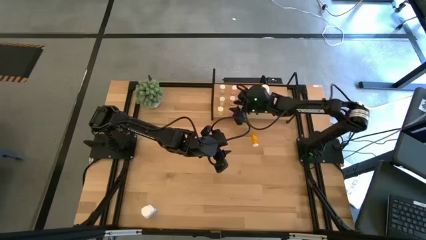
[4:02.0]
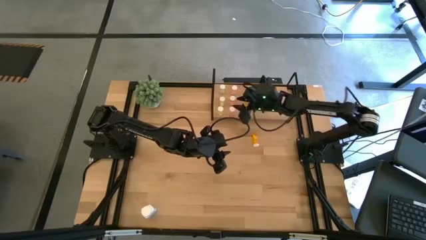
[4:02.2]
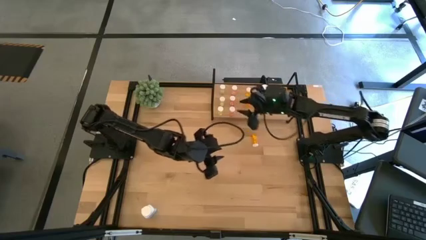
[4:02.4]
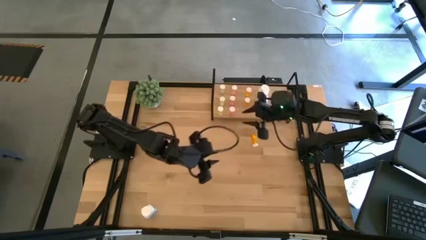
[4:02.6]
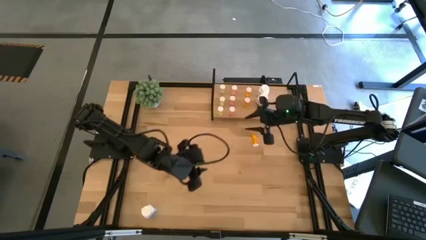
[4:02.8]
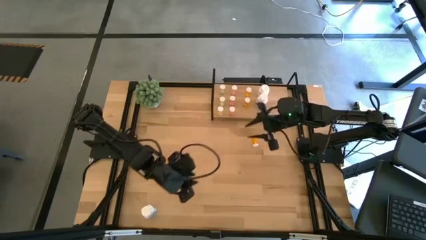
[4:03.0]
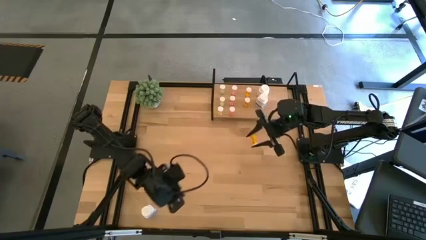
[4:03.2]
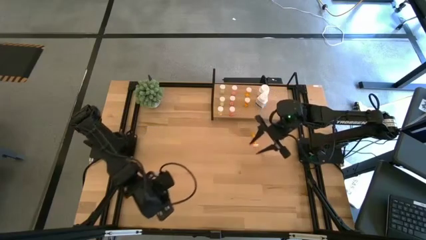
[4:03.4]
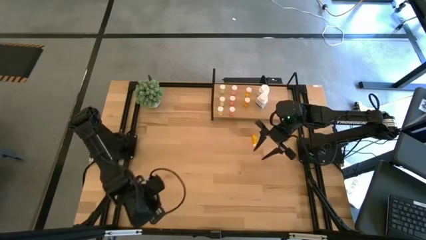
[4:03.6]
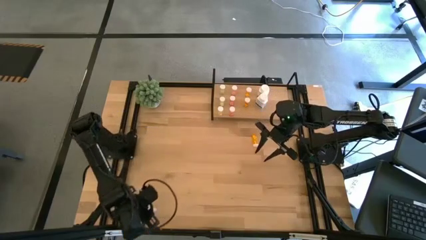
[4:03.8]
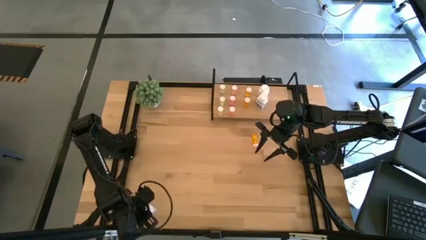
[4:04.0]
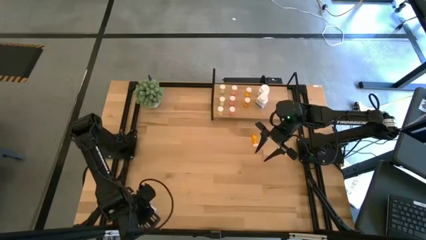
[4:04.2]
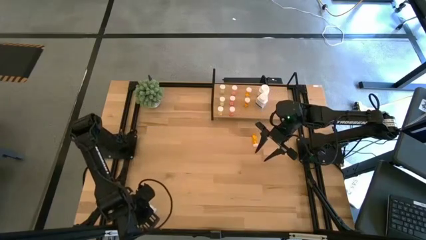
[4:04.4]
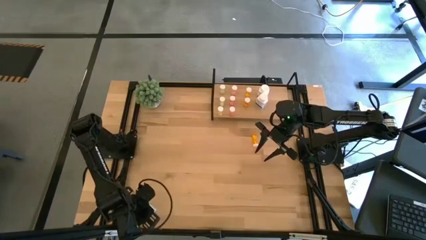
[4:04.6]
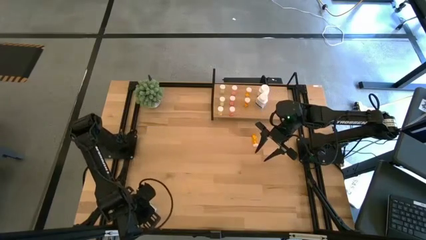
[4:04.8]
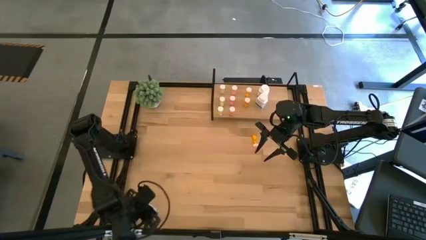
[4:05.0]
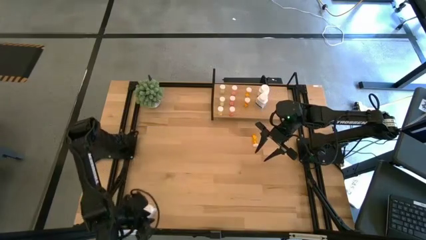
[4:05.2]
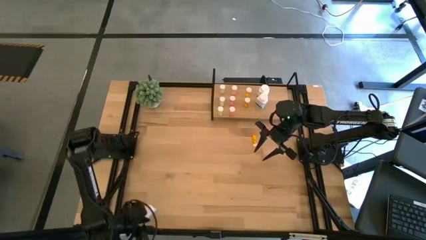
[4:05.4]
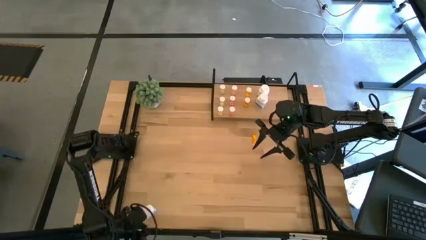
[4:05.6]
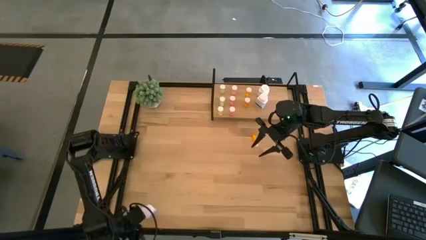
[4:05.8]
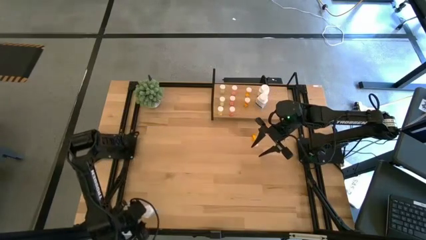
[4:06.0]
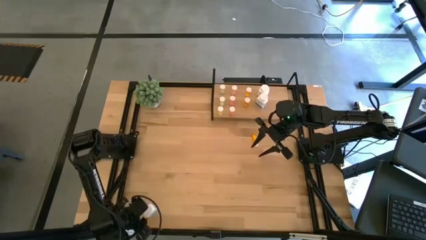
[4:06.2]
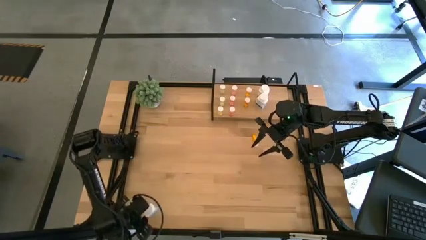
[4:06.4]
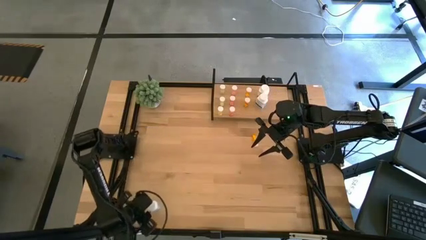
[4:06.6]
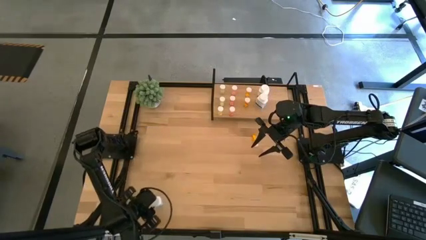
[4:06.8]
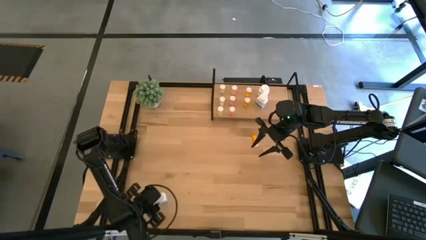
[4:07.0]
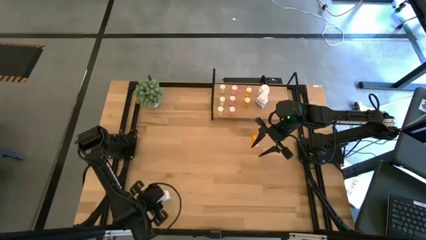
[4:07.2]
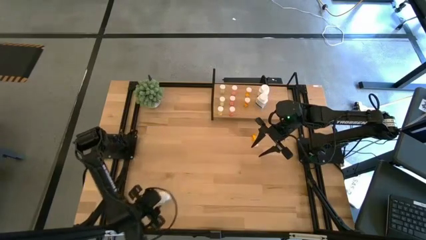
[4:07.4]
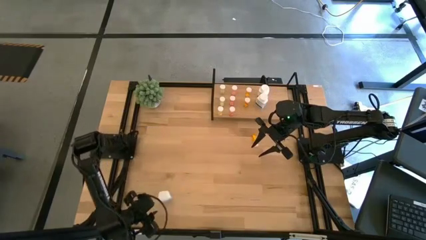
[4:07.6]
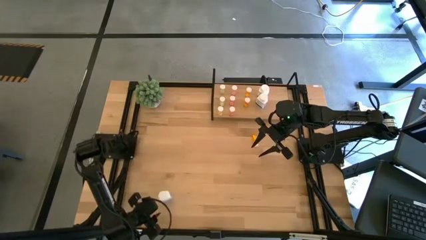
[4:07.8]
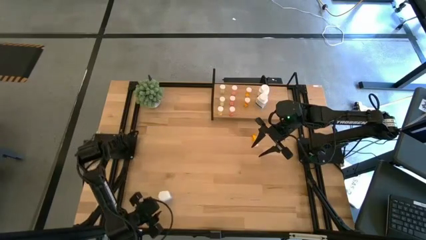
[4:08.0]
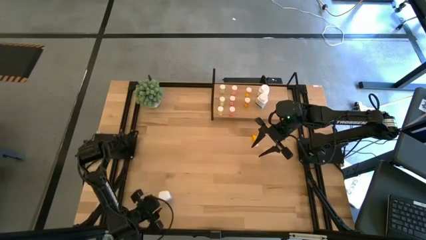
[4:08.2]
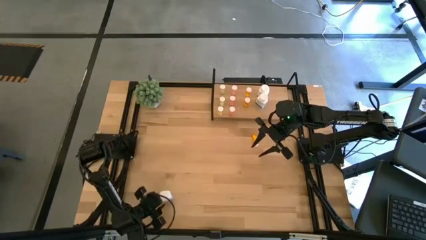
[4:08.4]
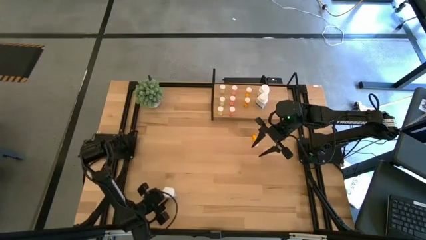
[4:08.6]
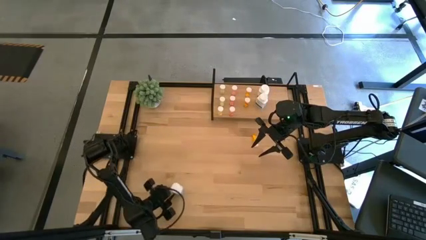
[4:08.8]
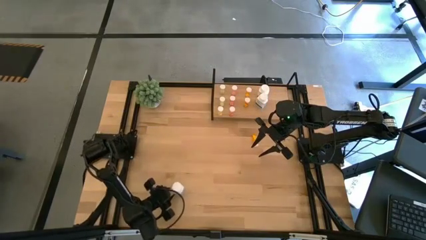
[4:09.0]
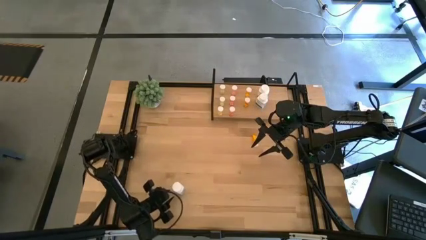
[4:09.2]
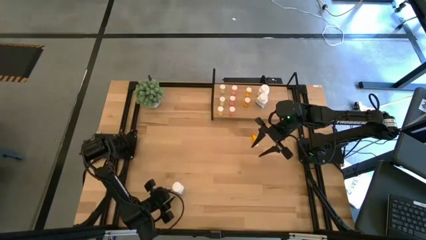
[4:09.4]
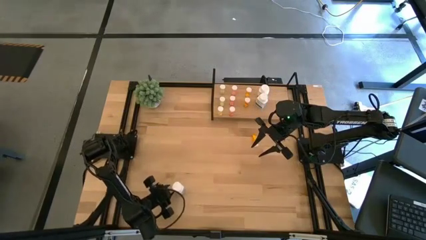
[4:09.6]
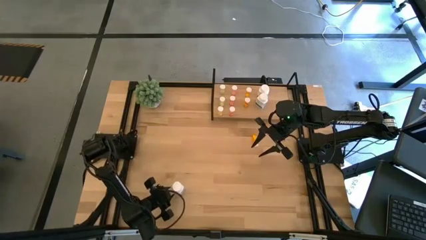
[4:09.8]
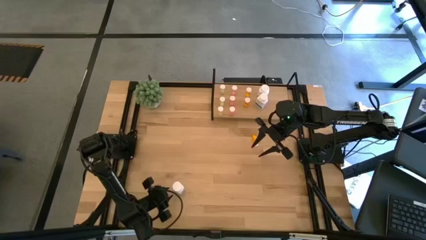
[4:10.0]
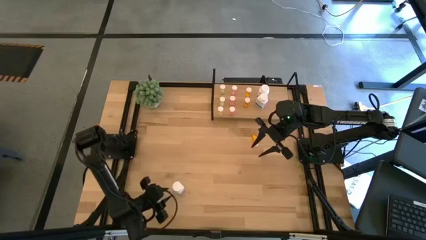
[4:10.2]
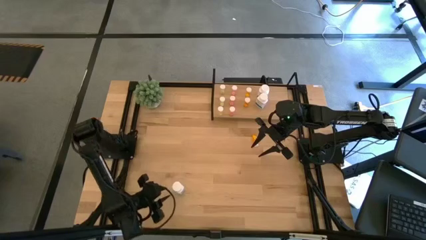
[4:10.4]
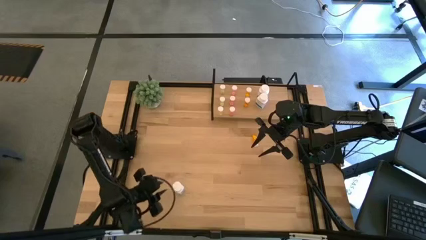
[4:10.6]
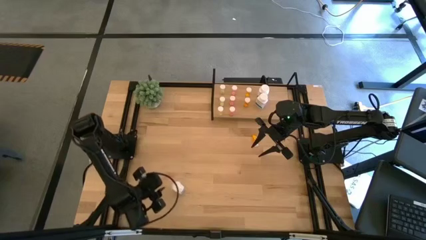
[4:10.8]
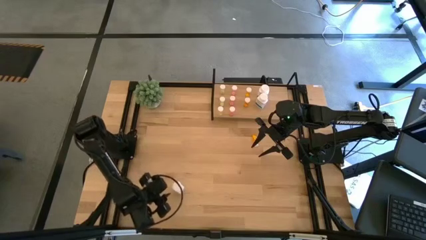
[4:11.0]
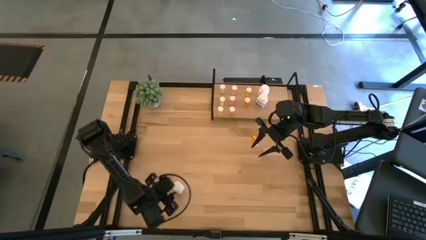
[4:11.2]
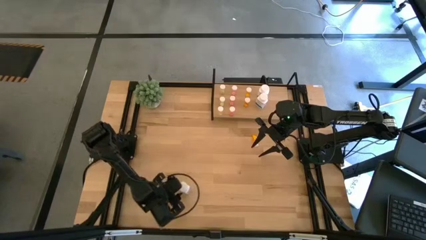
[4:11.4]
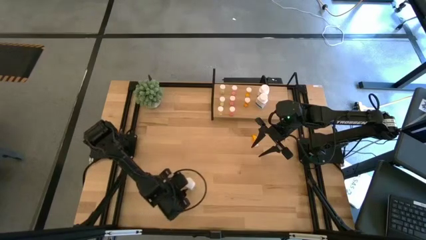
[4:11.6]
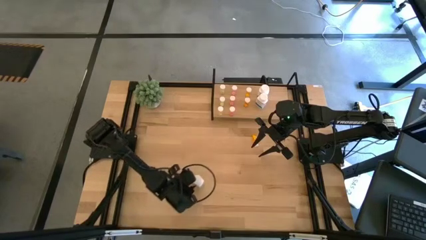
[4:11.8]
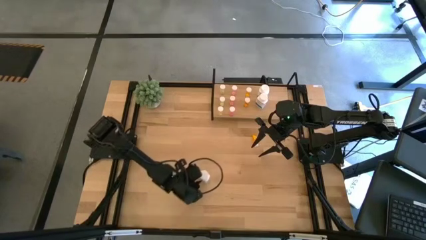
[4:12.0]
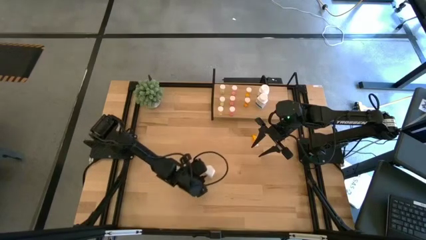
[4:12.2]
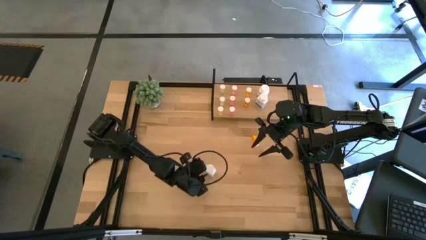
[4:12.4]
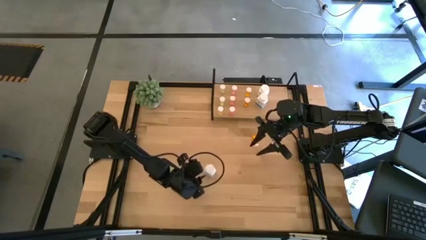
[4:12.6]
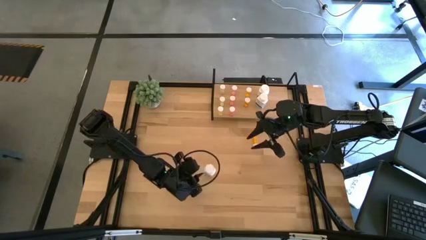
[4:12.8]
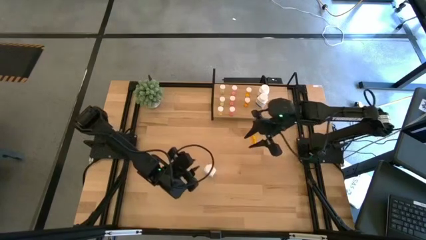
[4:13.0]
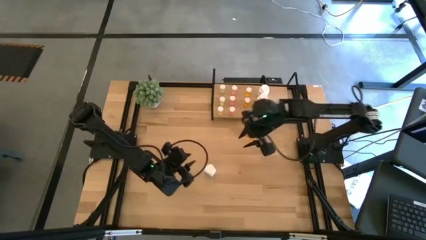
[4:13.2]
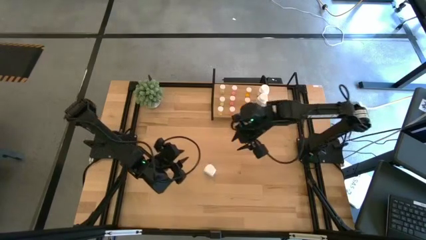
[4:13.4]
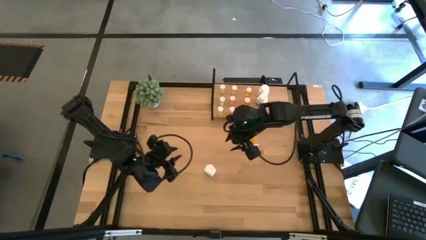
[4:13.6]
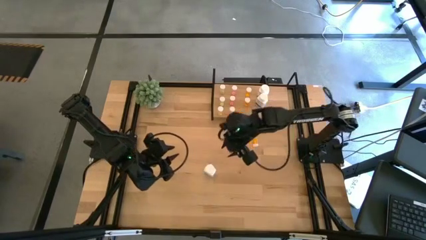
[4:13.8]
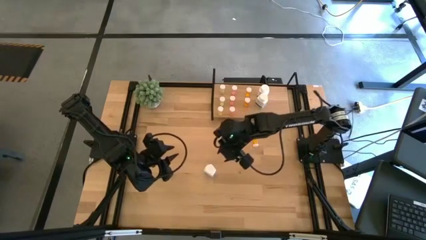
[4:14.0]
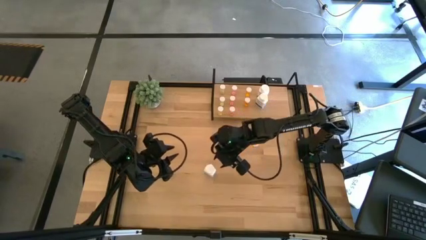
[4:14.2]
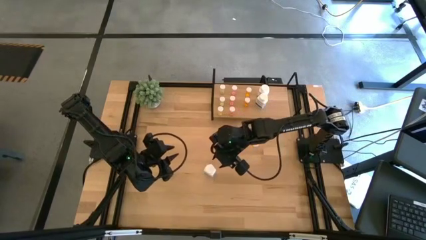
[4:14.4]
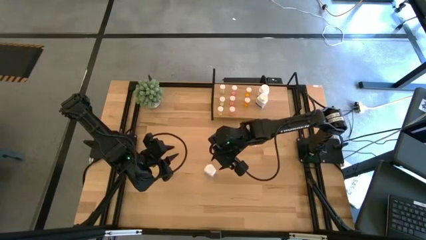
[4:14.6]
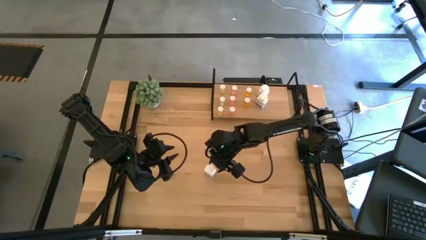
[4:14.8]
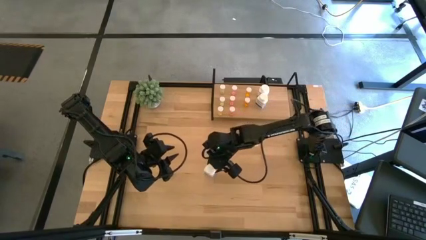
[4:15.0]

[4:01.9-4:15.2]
Task: Pick and place medicine bottles onto shelf by color
Put the white pill bottle on the shelf aligned with the other white pill bottles

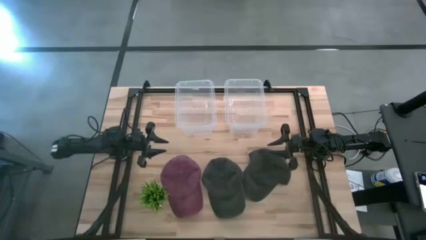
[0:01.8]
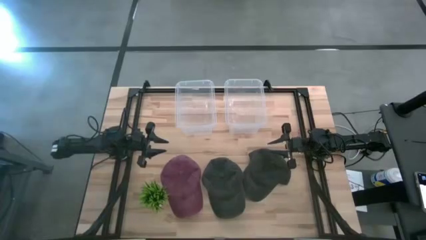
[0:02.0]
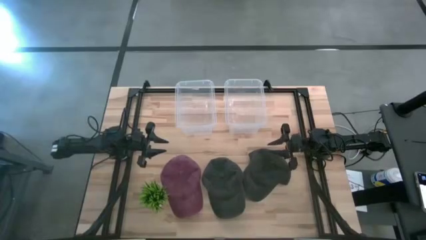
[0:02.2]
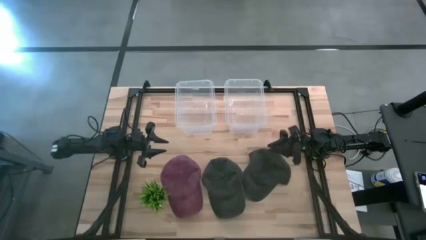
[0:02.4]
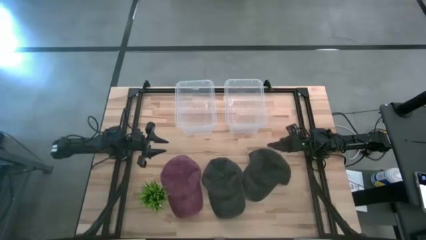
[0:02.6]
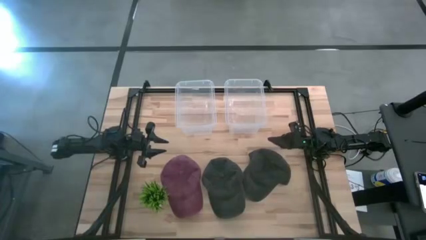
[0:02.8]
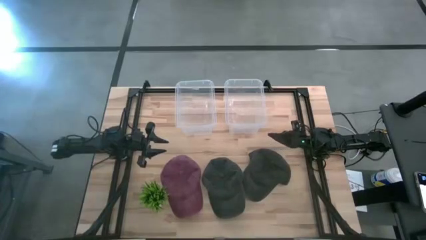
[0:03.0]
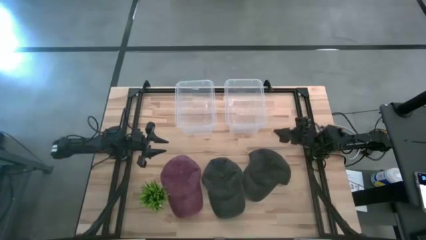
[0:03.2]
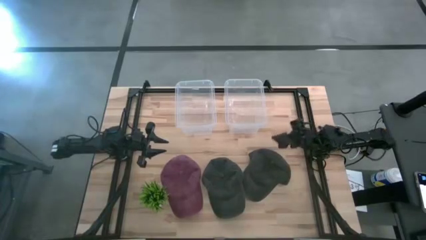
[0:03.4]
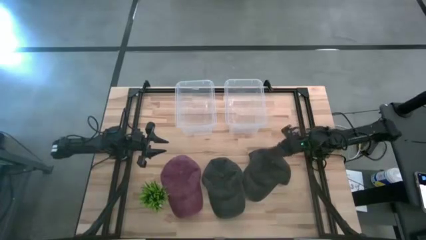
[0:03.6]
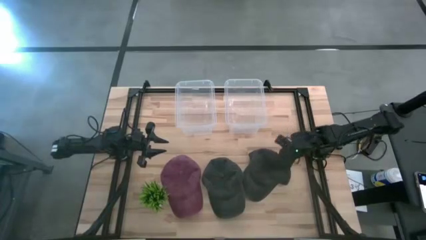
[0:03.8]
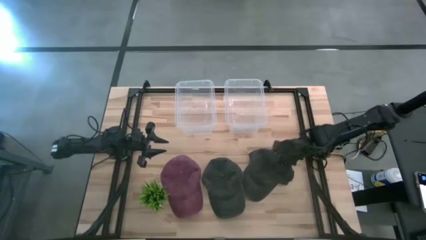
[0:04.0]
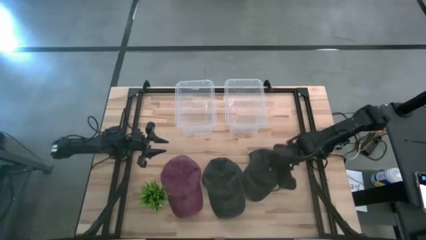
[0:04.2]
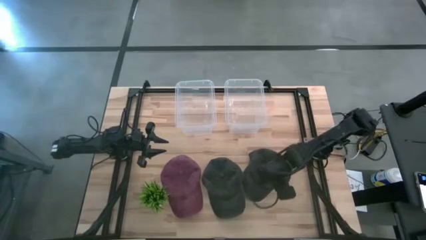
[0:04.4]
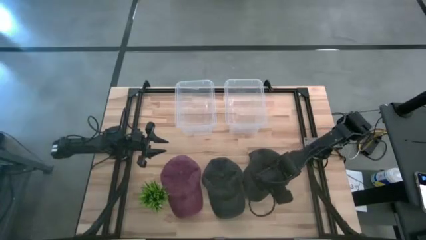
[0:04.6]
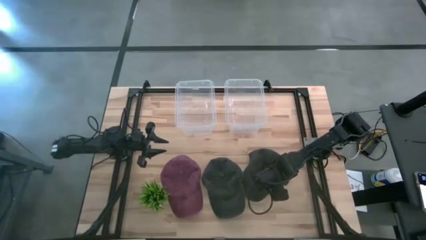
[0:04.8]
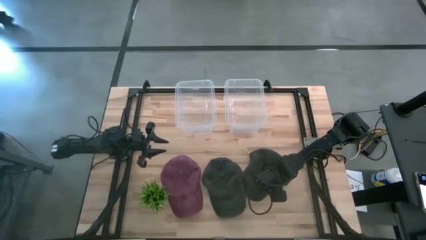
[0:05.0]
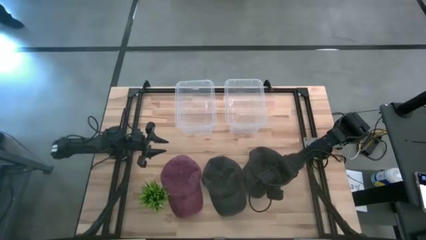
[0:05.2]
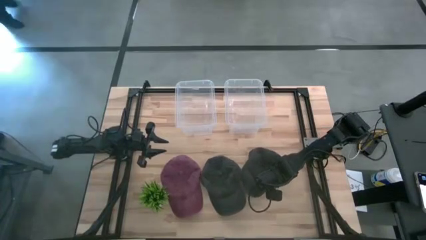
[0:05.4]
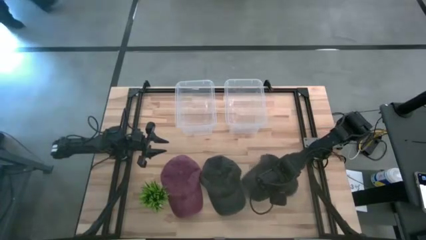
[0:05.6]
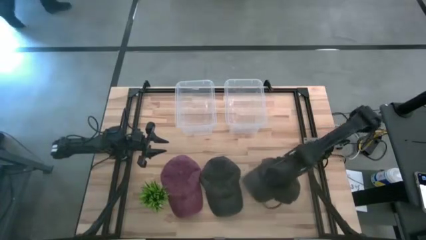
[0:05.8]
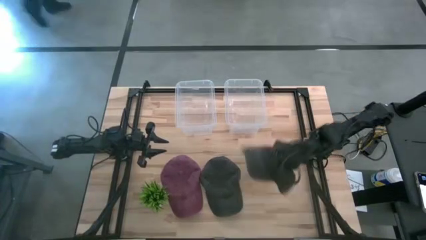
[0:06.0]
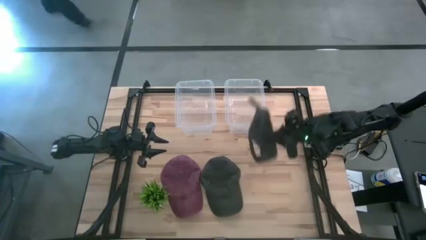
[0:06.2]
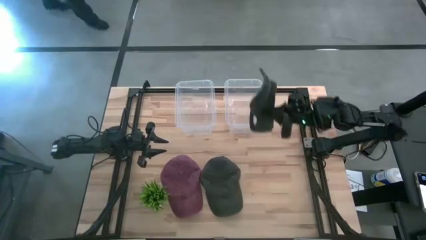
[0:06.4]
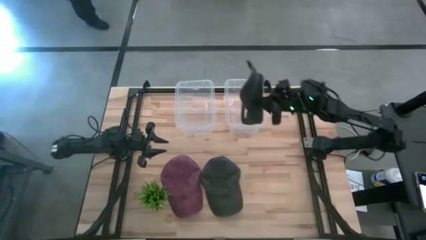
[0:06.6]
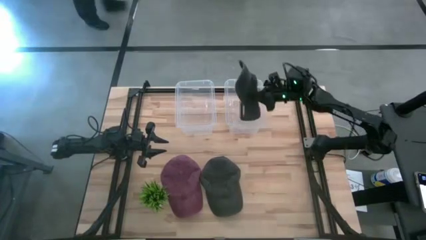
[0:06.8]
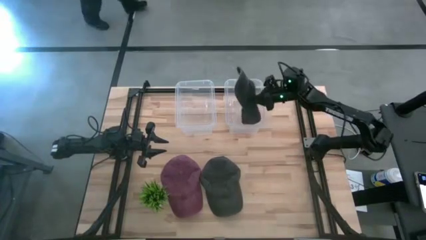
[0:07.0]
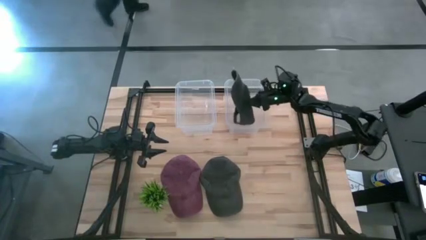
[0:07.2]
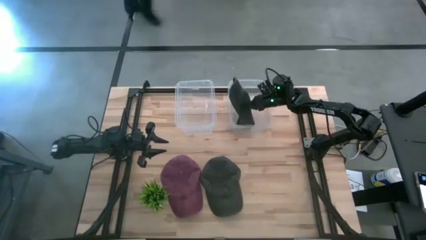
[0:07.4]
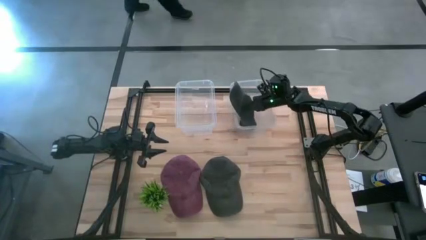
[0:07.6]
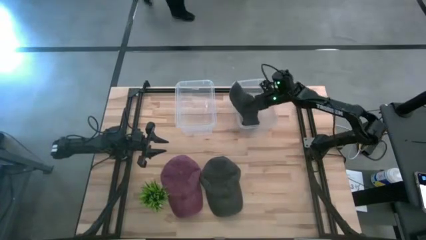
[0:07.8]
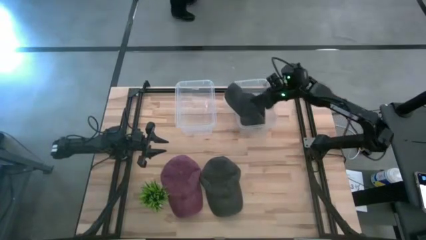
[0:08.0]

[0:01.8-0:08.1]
Task: Pick & Place hat
Put the right black cap into the right transparent bin
